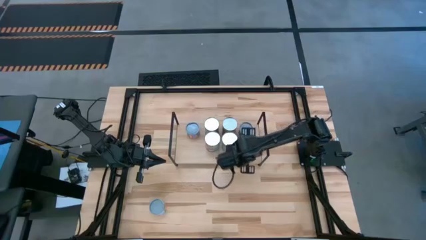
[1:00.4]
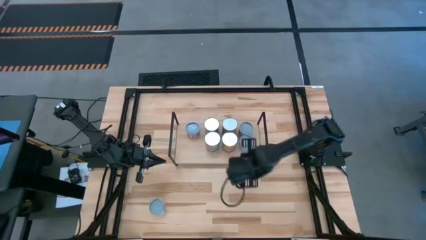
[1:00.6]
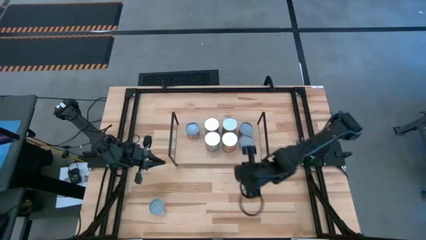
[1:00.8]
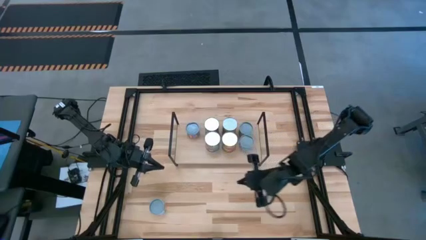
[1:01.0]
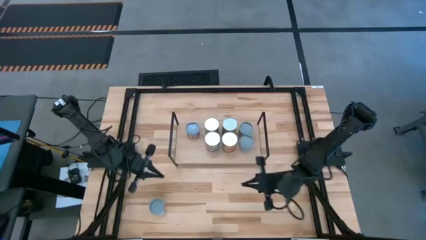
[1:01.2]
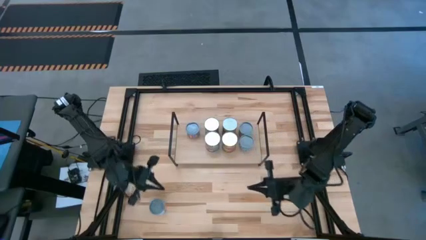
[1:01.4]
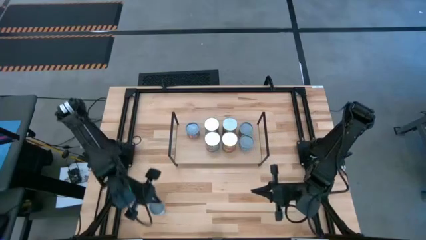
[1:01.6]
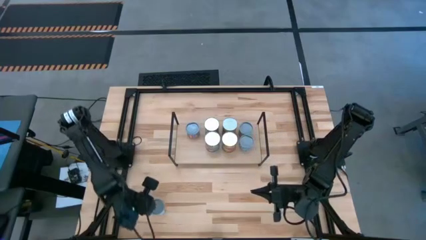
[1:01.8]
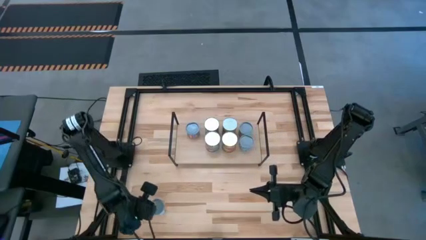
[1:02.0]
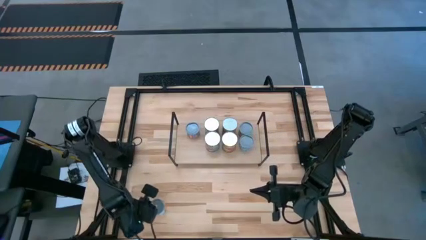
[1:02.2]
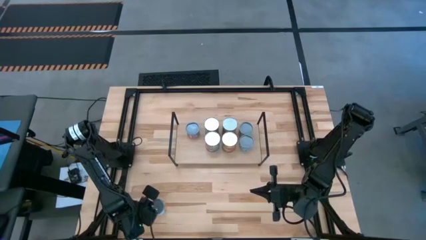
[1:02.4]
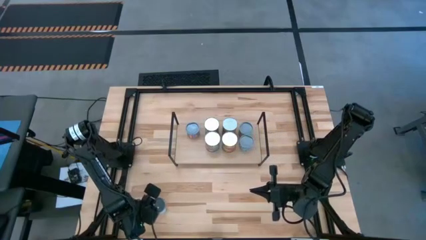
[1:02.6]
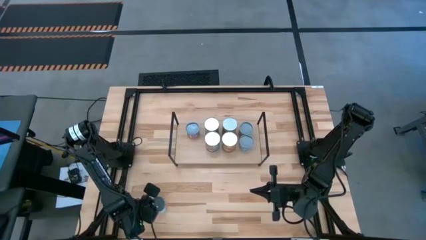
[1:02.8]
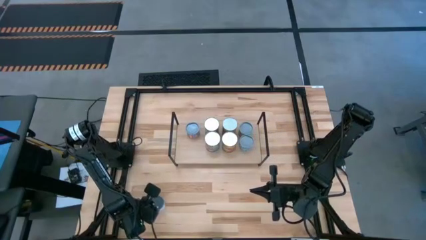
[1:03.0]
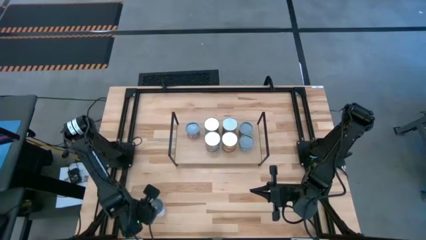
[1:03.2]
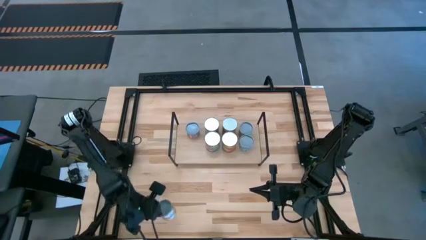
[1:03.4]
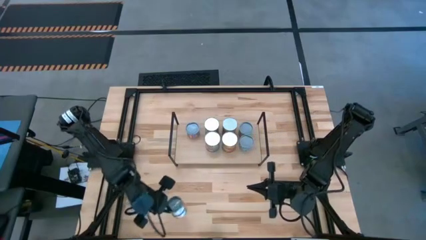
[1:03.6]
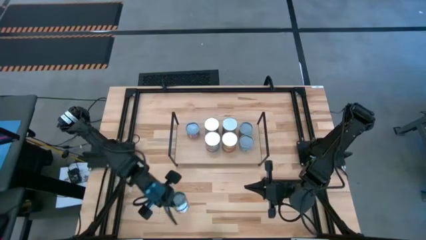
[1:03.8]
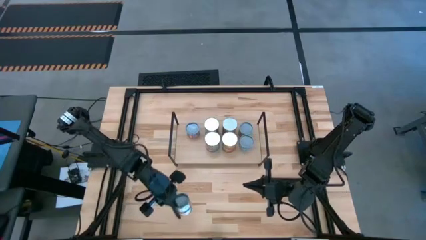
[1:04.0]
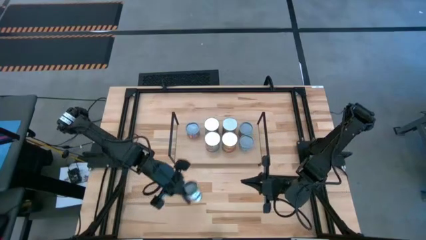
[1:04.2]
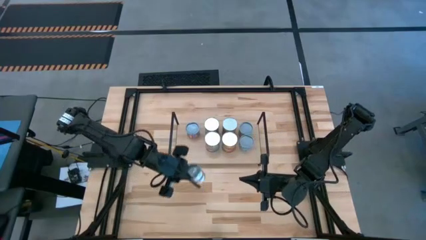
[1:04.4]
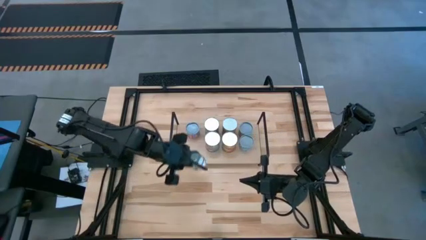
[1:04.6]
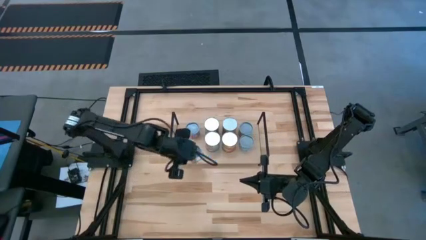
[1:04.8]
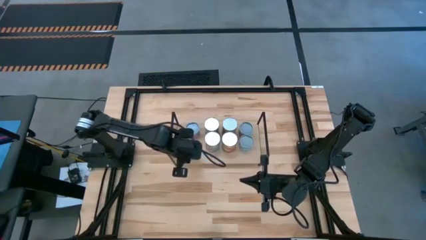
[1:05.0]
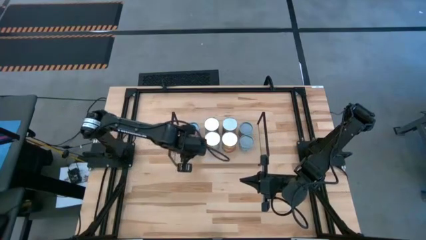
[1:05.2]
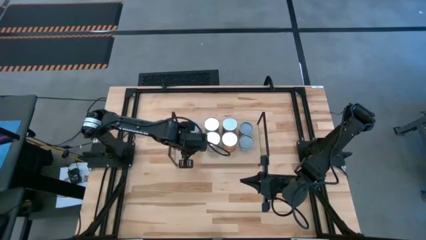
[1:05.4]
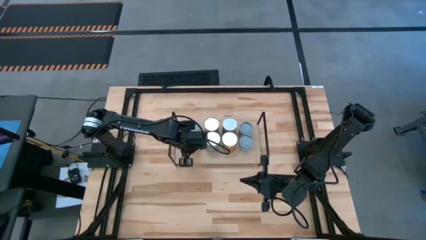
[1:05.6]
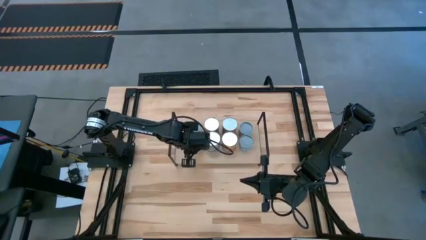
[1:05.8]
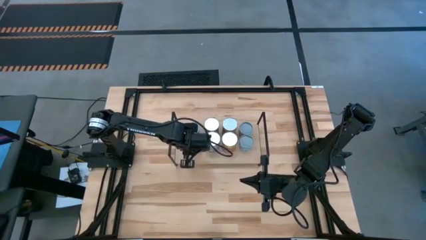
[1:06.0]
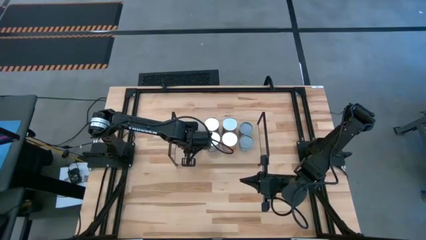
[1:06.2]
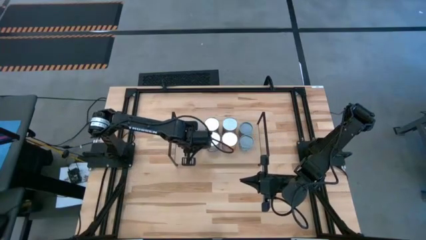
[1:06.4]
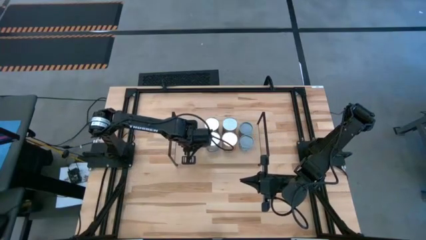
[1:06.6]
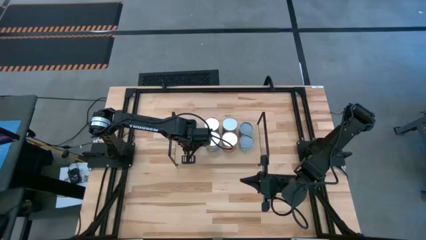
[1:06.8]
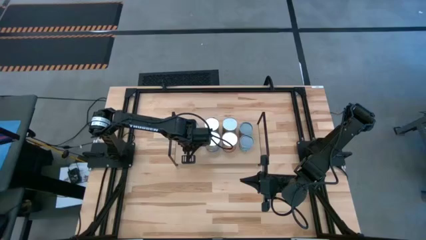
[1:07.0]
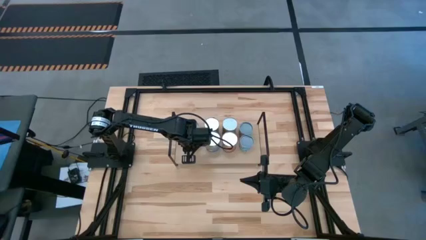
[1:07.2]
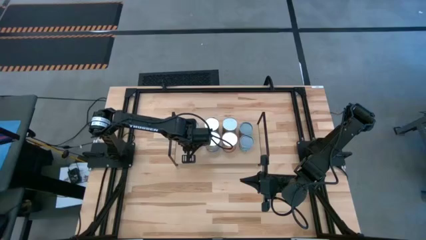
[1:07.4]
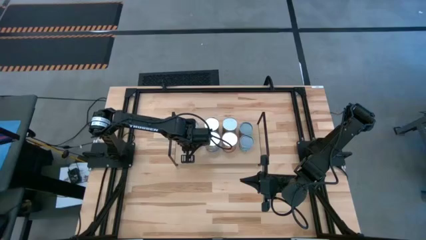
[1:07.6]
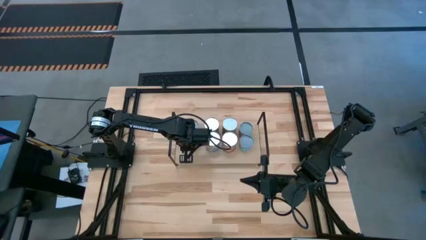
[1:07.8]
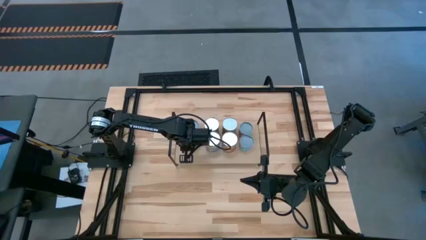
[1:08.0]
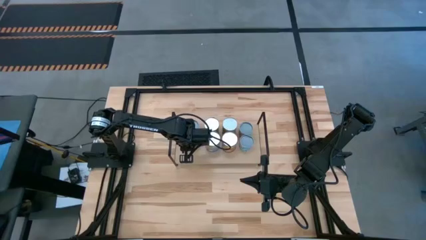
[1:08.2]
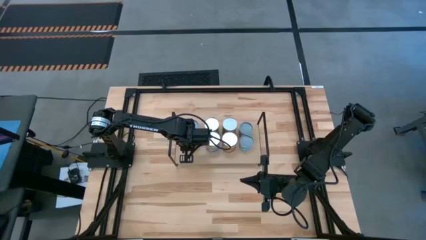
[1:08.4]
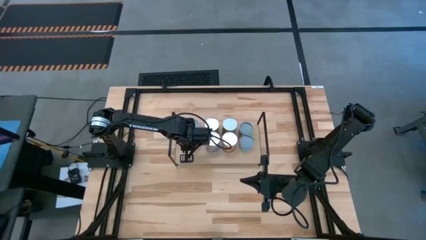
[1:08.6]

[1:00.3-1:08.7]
Task: Pick and place cans onto a shelf
Put the canned oranges on the shelf

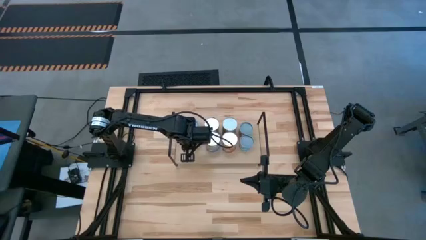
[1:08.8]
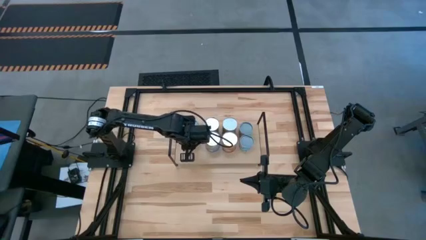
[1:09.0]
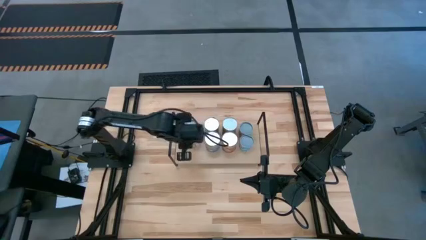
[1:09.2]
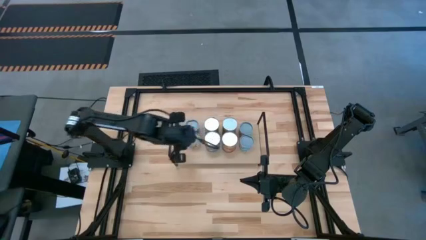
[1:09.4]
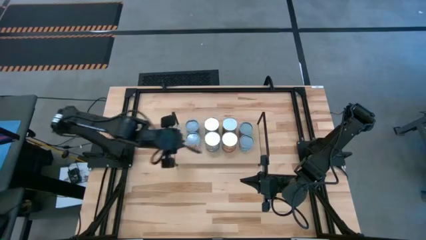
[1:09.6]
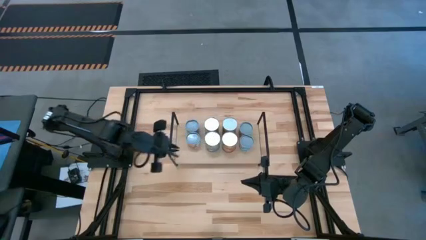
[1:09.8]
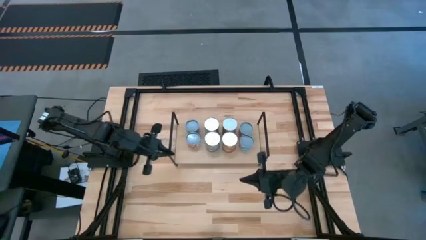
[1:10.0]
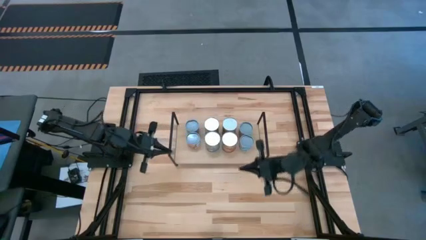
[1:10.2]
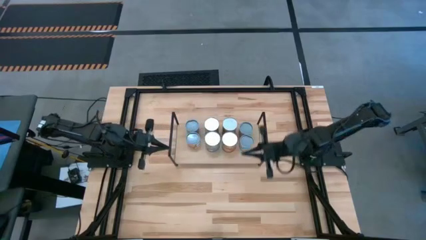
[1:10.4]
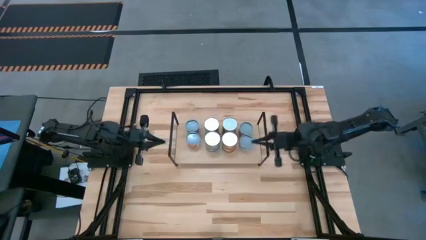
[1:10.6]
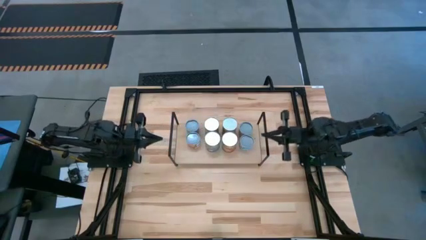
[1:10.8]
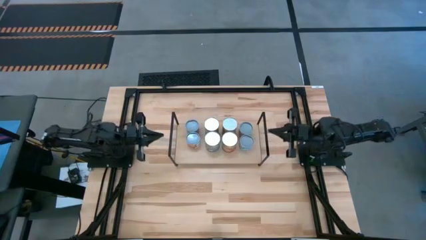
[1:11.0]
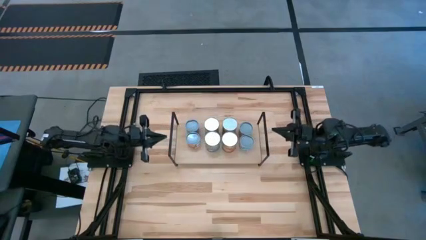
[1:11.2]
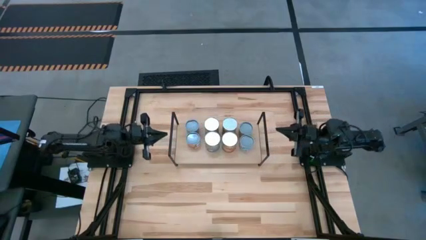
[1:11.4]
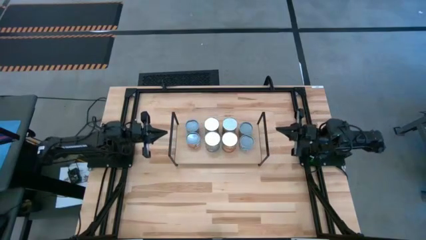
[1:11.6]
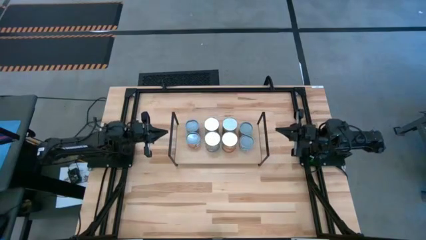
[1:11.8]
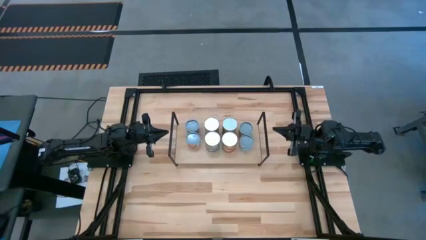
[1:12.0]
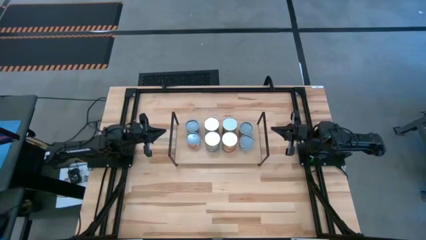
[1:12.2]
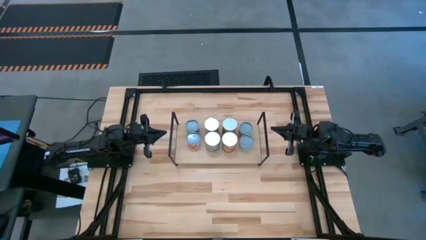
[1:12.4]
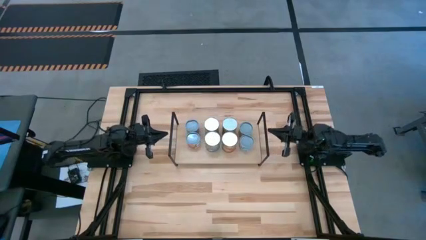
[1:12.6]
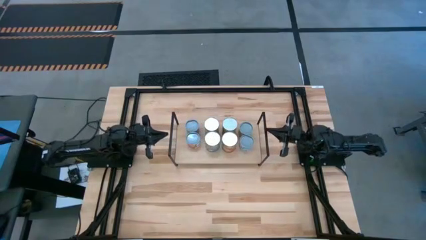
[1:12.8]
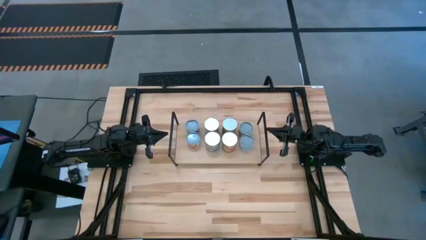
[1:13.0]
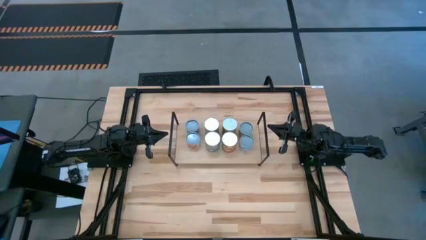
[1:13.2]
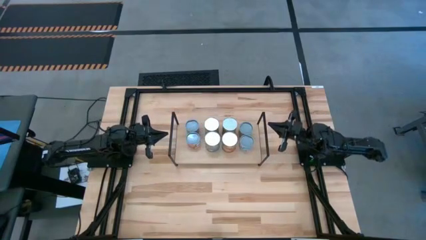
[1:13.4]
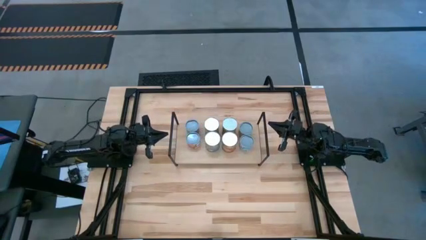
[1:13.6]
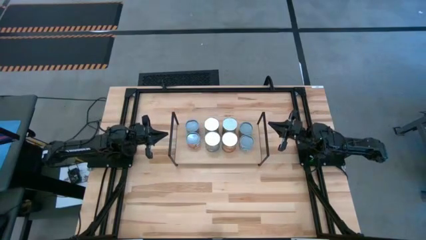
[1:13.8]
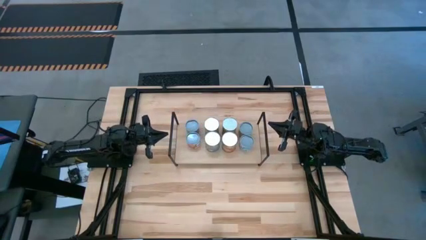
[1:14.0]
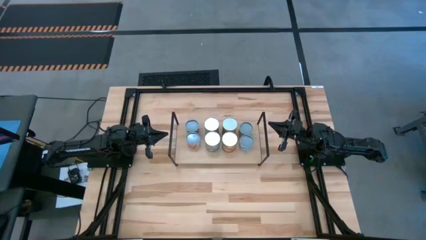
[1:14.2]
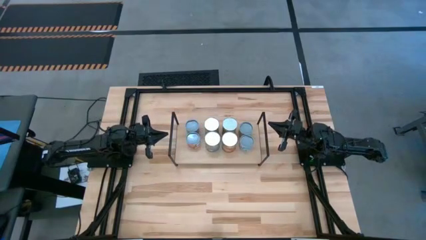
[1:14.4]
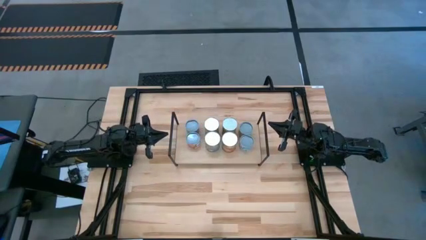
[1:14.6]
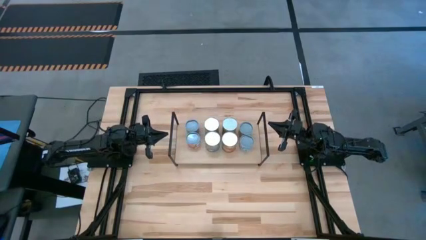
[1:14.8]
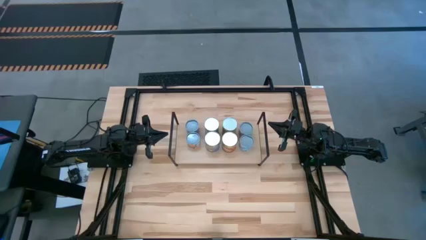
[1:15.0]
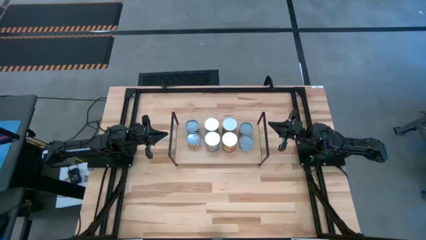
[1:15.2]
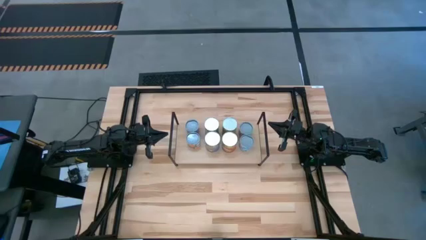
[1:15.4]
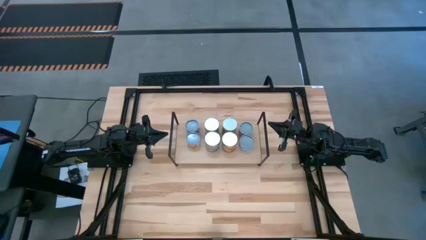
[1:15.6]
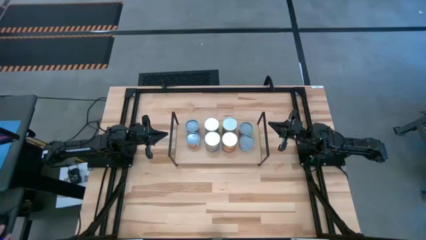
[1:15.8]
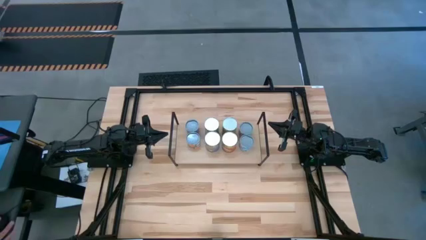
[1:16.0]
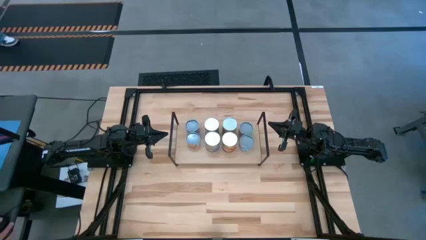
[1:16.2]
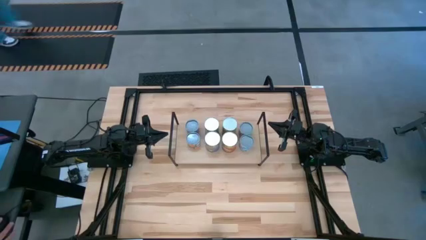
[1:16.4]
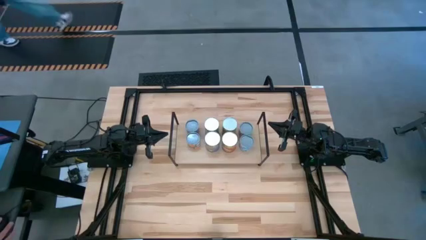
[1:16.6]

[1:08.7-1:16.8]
Return to Home Position

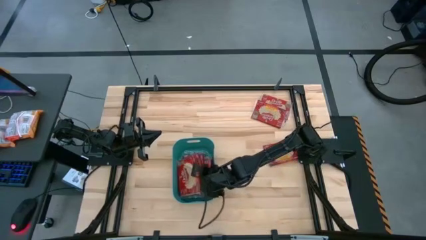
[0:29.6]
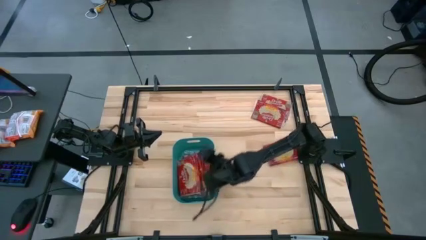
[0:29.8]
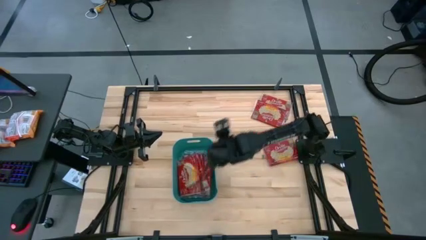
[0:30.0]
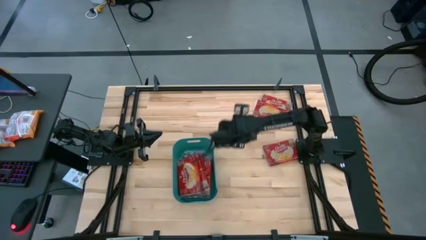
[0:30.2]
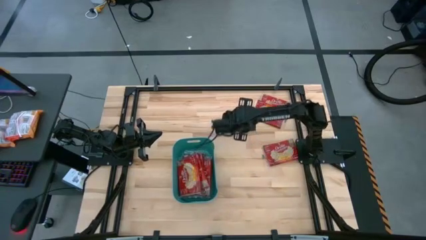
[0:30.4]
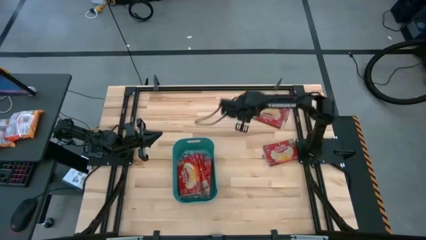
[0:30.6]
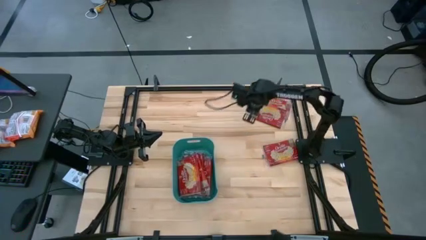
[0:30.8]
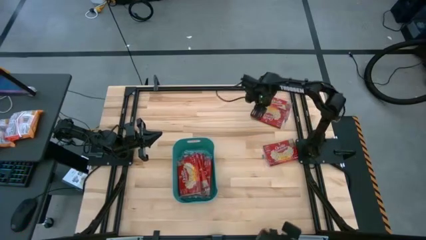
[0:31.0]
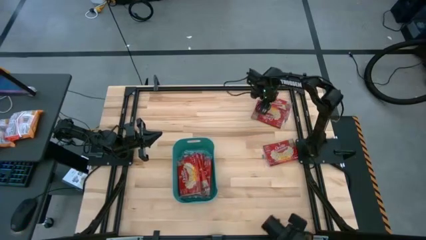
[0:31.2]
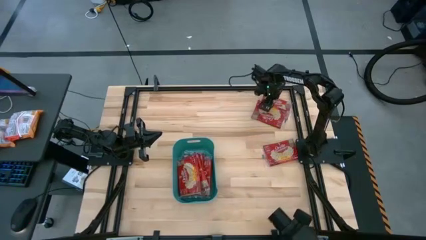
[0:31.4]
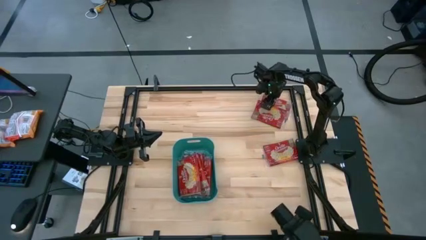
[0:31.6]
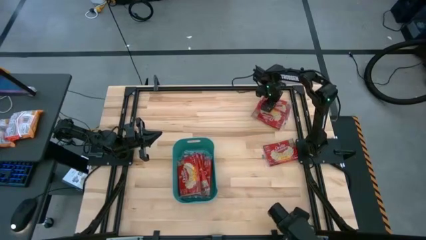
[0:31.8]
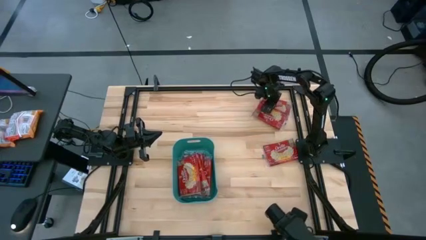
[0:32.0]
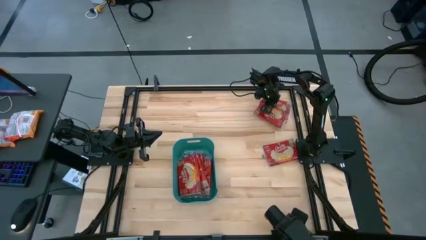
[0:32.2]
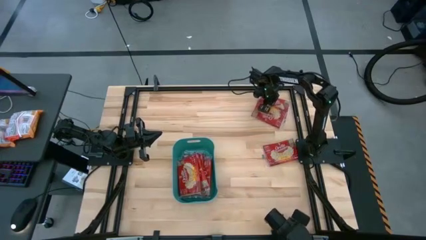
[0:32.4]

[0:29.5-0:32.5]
Task: Sort popcorn bags into baskets
Put the red popcorn bag into the green bin
